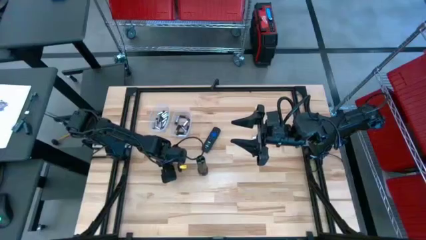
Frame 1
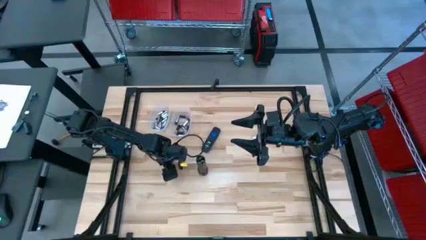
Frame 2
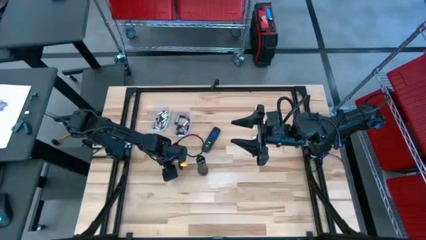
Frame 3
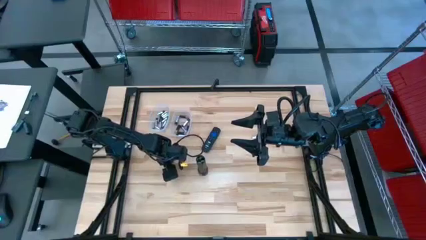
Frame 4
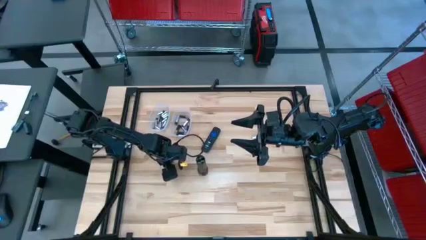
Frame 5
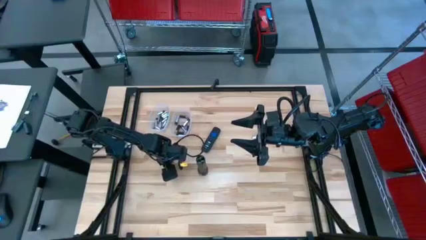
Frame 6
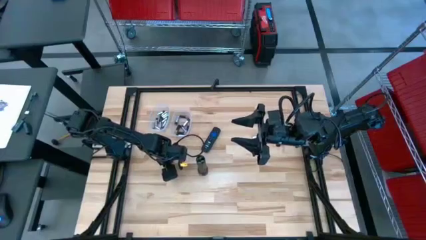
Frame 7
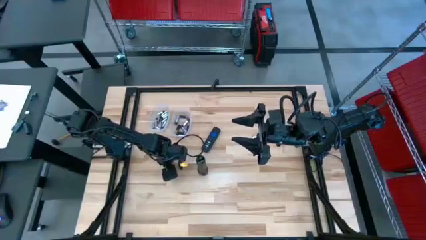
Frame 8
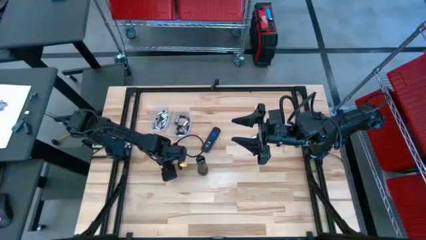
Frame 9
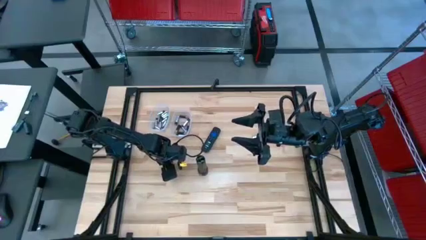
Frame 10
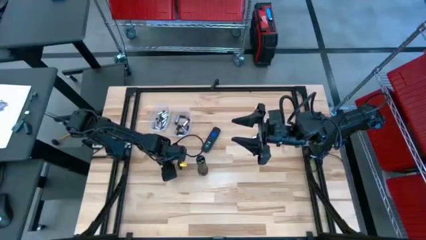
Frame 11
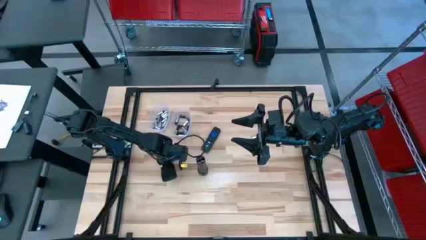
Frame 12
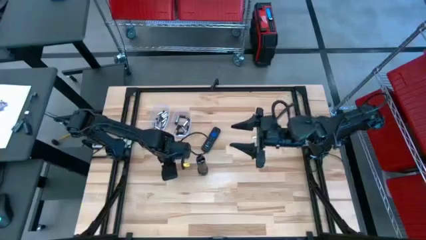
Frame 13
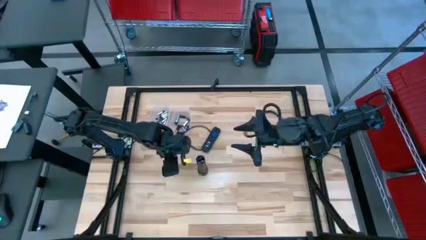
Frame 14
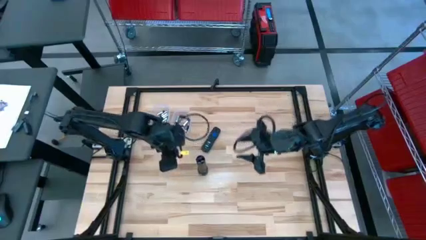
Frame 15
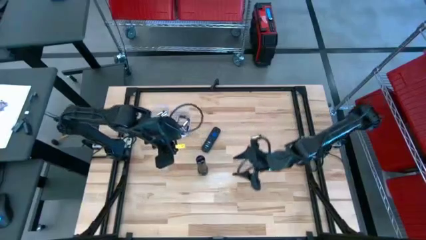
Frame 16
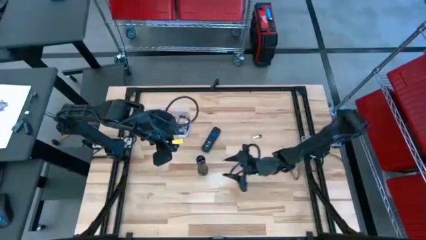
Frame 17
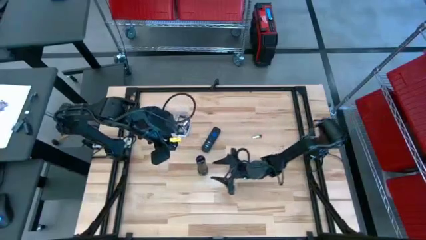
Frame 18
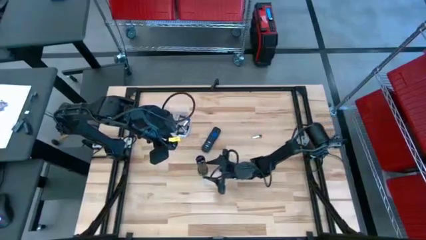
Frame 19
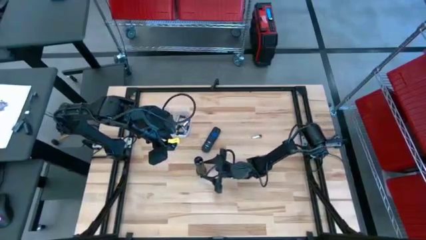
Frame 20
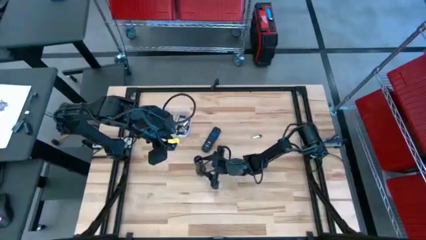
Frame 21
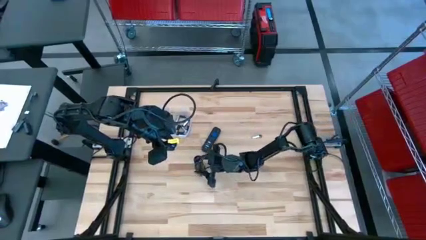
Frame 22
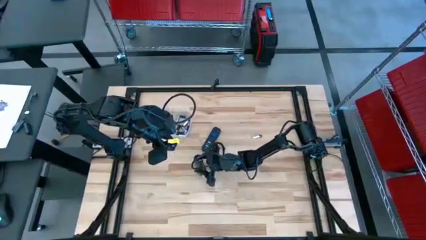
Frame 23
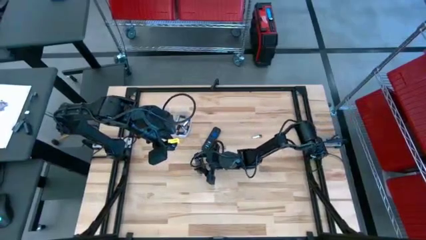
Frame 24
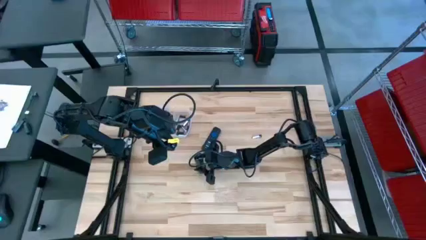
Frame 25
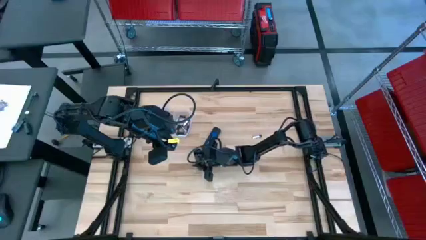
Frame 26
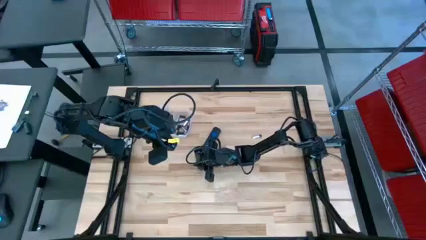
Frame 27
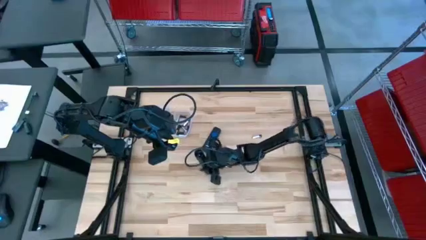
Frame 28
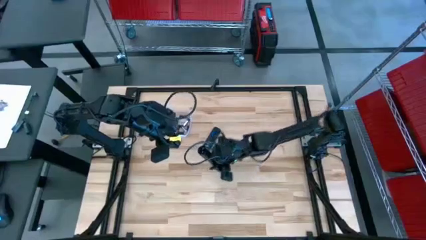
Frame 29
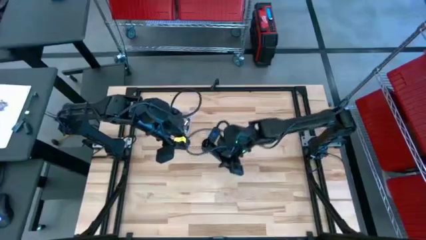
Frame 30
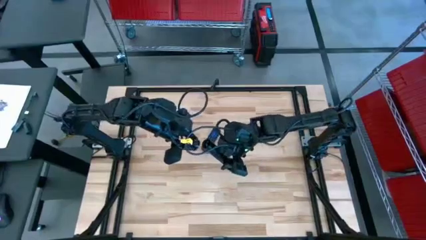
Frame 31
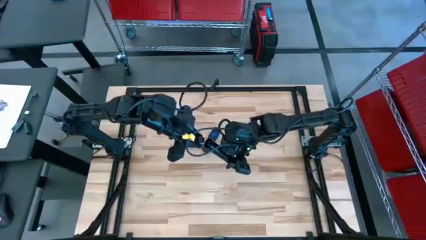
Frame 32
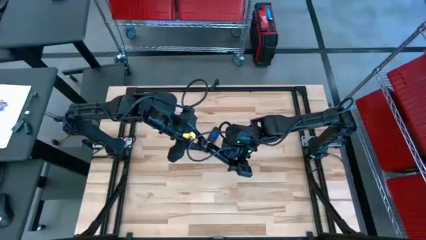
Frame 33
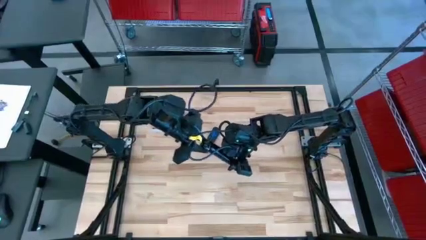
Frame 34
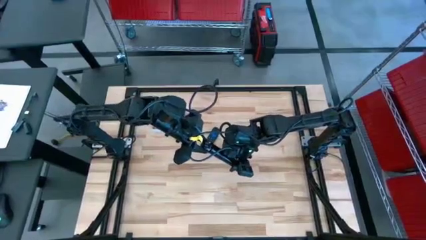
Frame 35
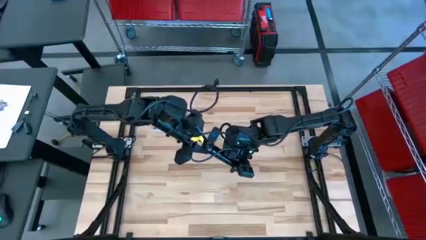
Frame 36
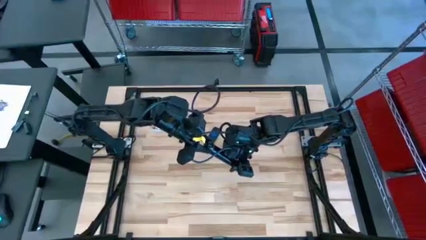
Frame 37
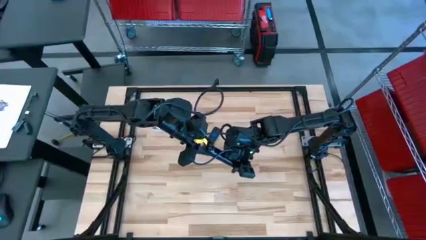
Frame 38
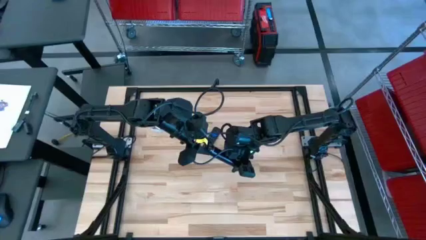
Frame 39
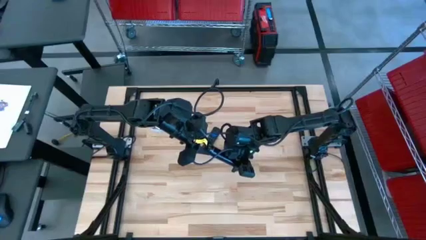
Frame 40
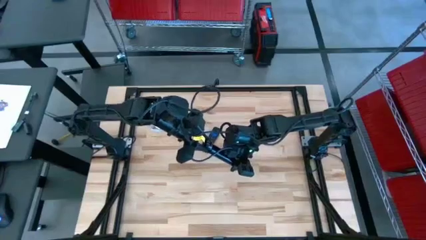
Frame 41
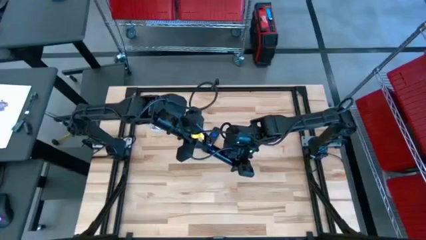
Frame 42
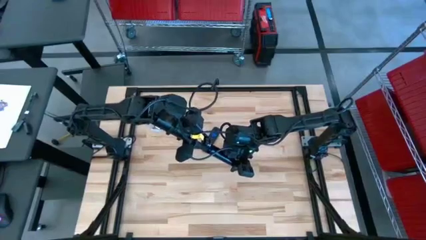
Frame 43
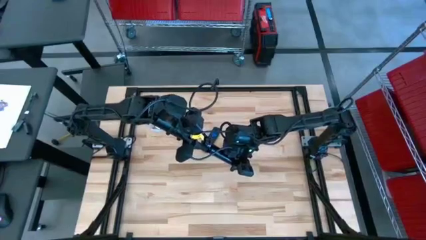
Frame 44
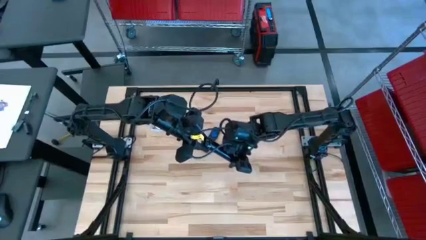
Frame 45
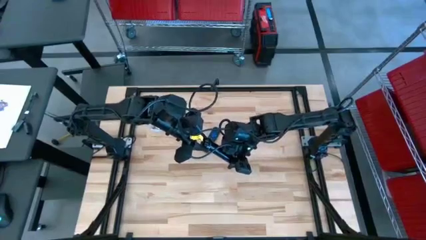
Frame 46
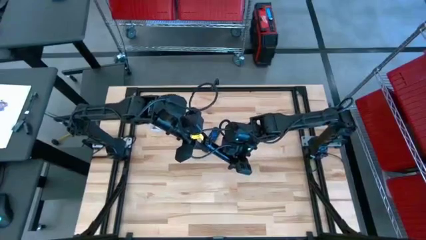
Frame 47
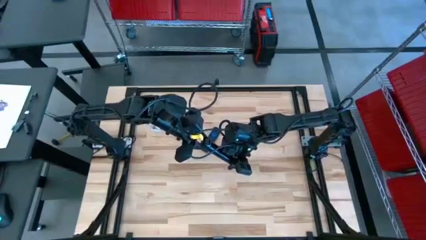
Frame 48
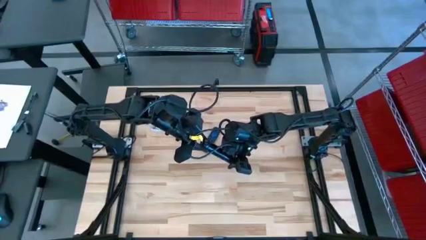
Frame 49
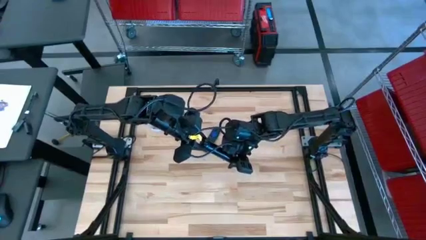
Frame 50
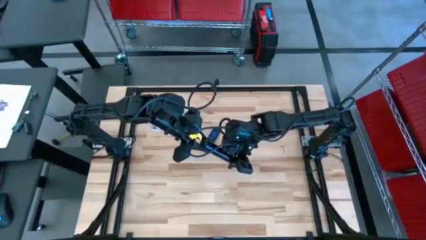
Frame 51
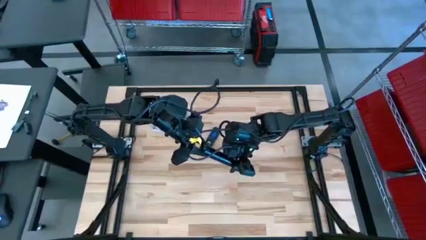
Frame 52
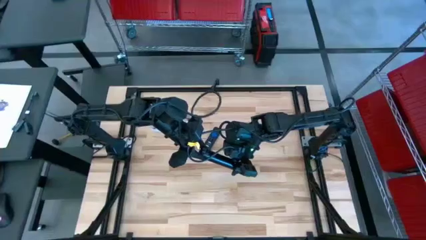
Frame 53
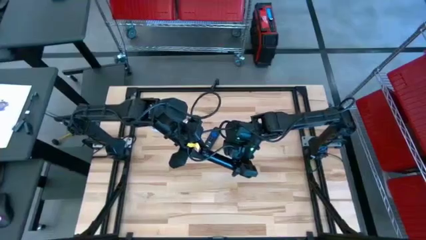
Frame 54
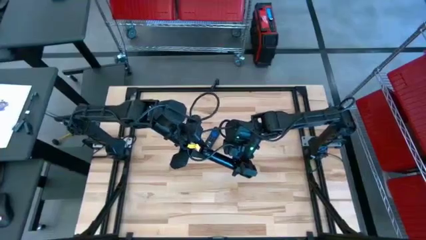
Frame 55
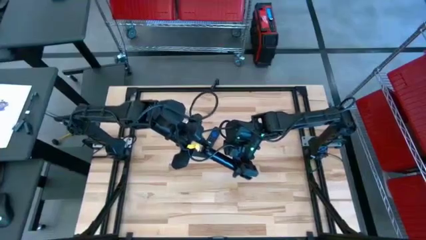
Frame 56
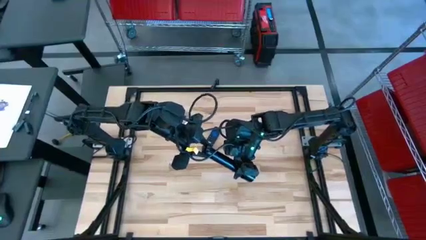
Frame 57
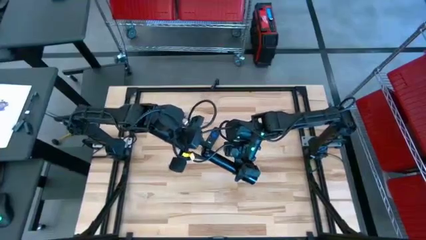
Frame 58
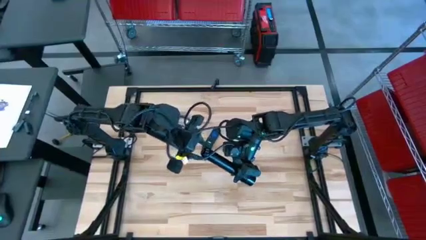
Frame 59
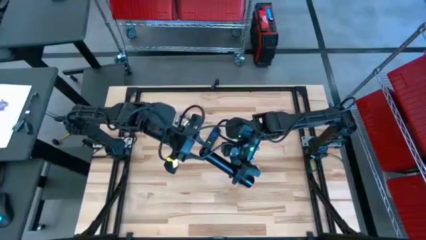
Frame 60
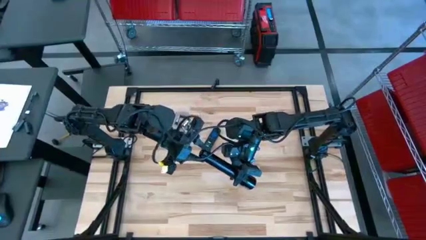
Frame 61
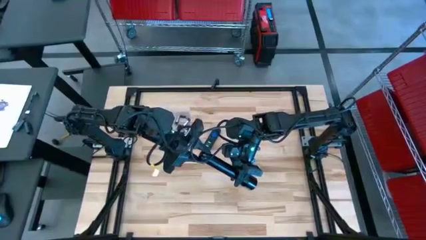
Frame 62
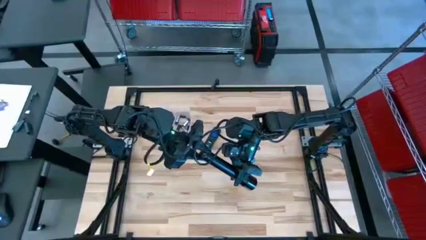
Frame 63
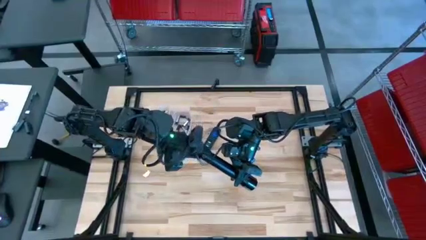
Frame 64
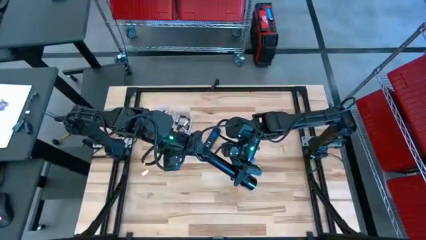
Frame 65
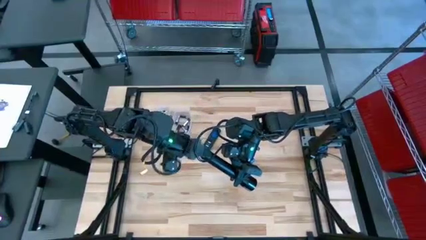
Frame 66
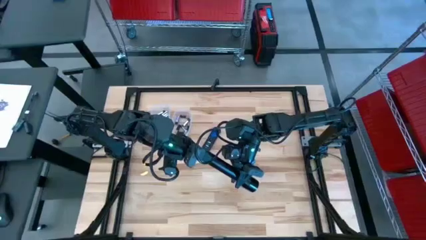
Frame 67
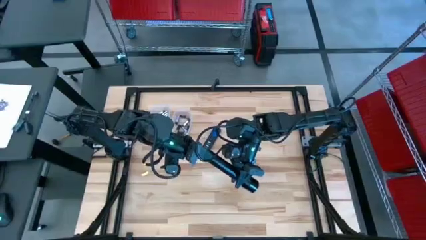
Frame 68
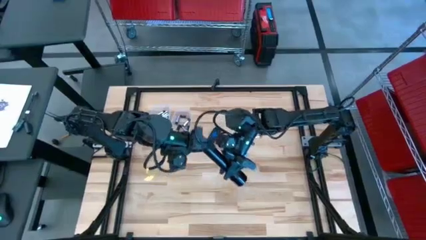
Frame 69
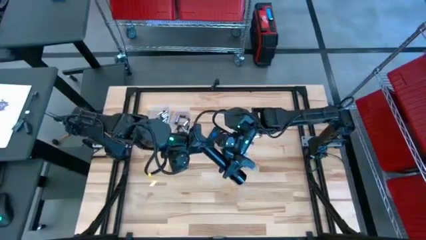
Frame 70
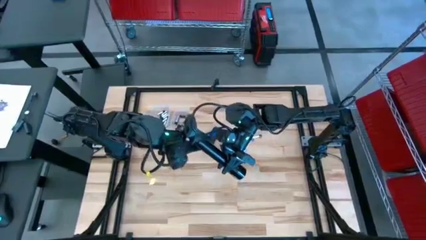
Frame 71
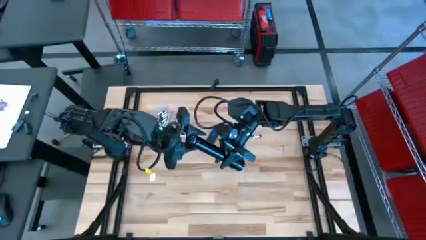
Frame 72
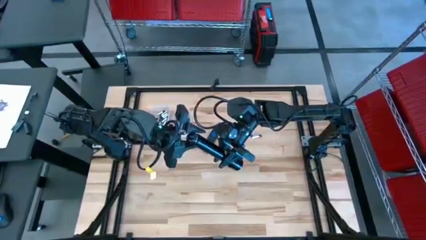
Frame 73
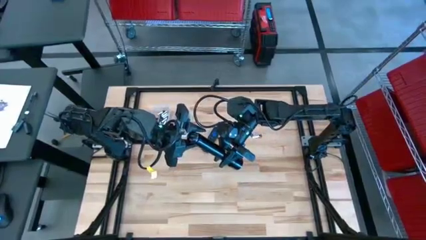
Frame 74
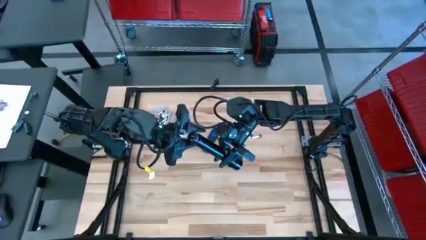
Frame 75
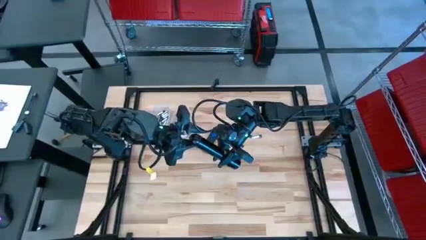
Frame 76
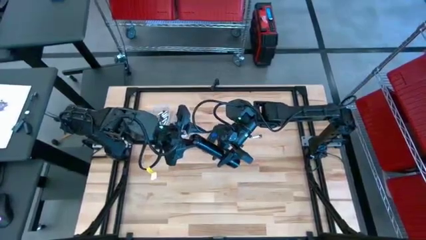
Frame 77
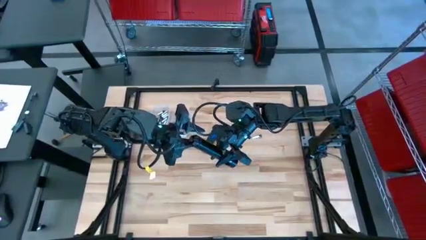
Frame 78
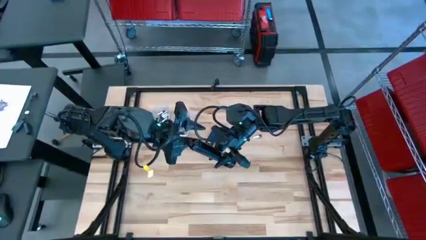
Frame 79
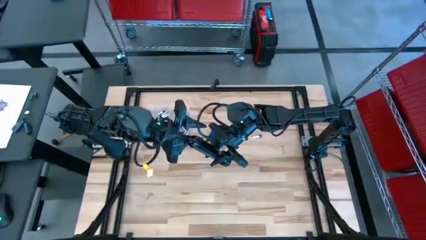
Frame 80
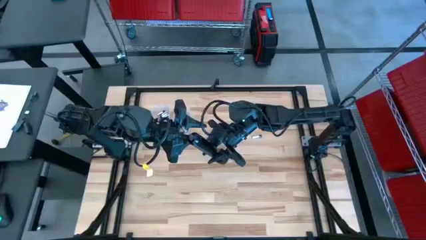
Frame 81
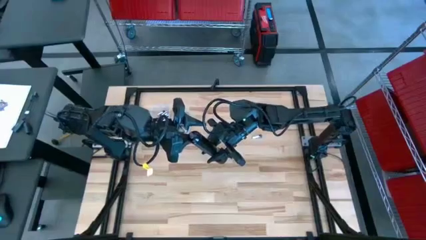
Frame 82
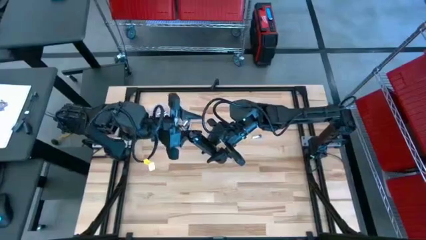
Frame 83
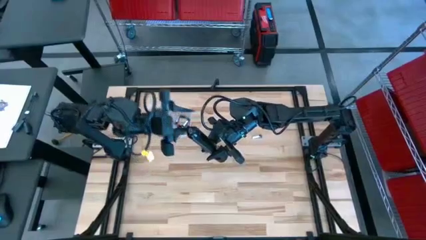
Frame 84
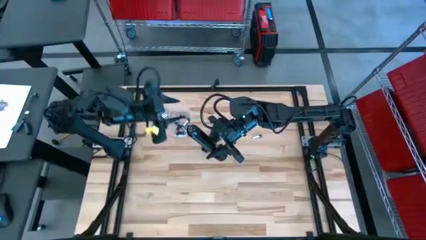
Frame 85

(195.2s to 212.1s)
Task: Insert battery
Close the flashlight battery compartment
